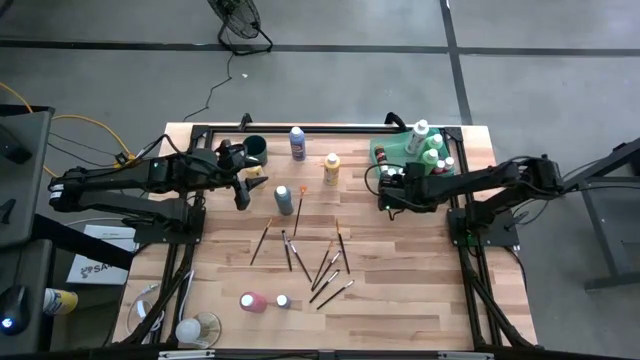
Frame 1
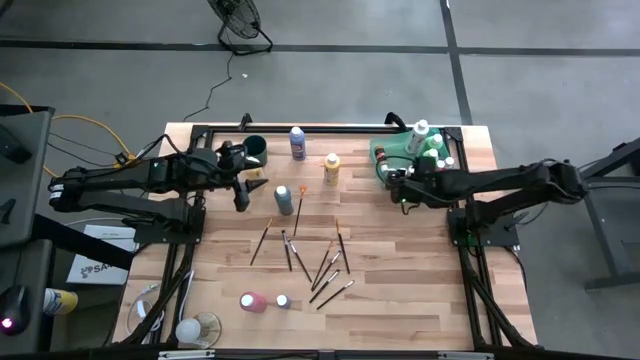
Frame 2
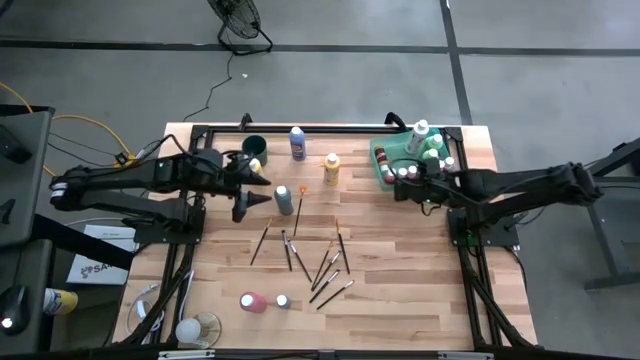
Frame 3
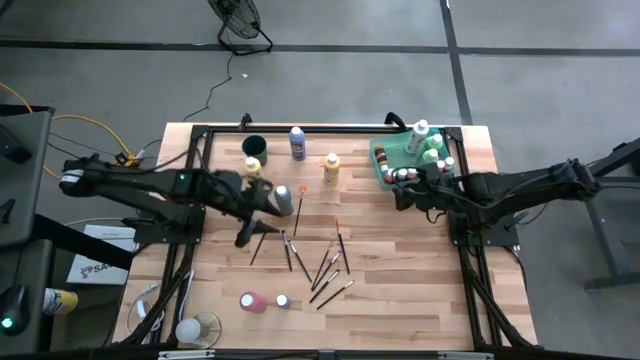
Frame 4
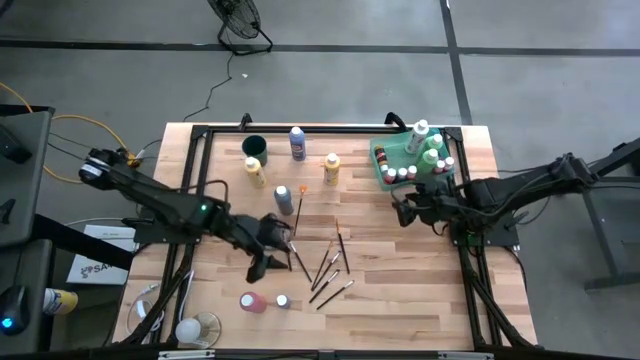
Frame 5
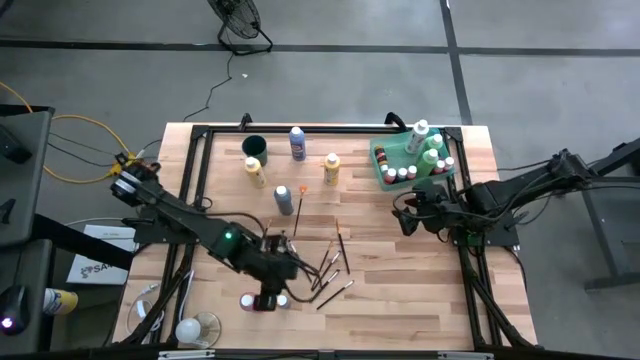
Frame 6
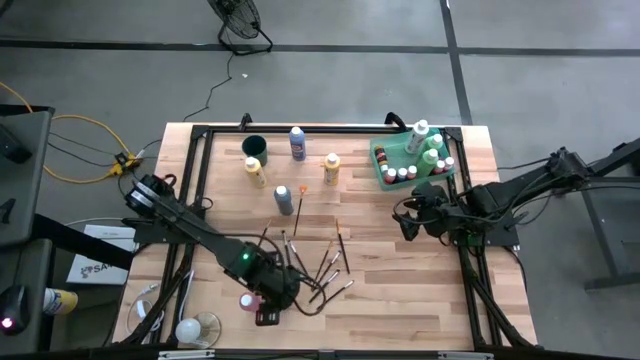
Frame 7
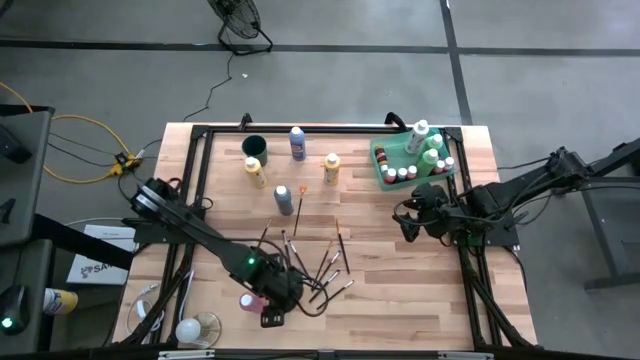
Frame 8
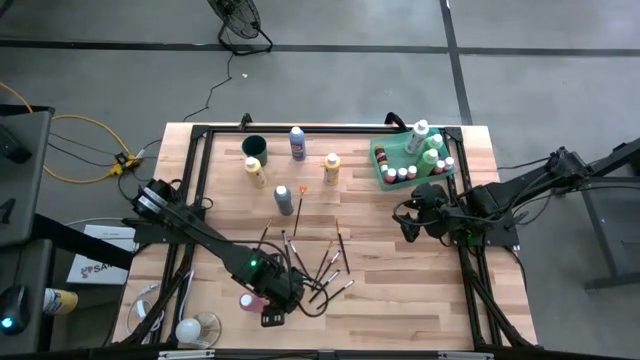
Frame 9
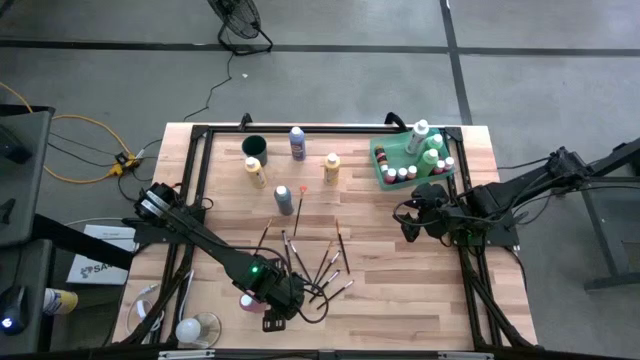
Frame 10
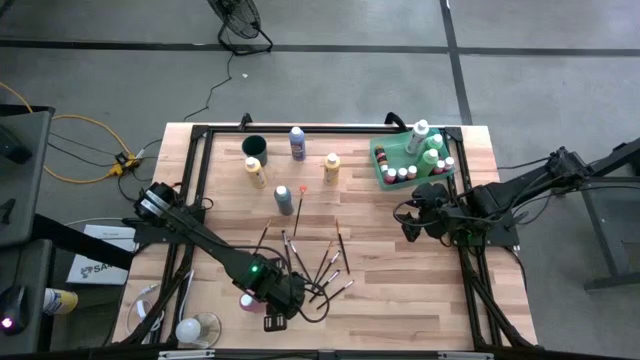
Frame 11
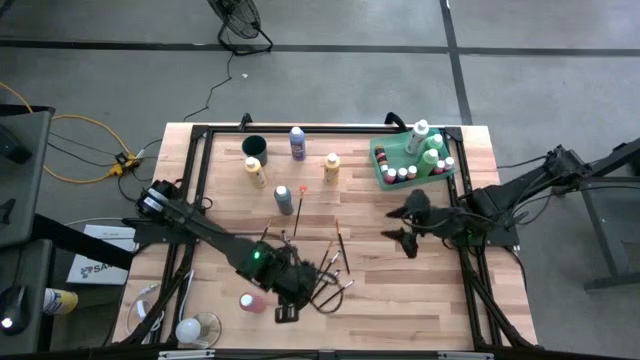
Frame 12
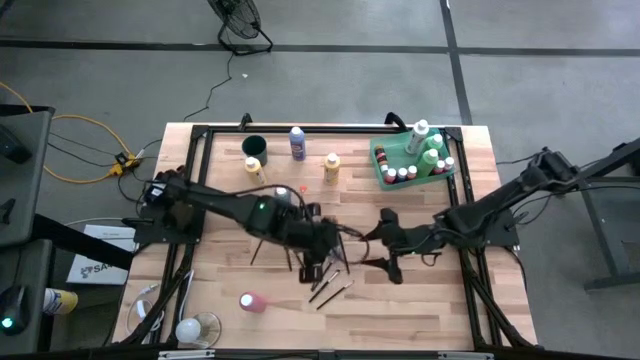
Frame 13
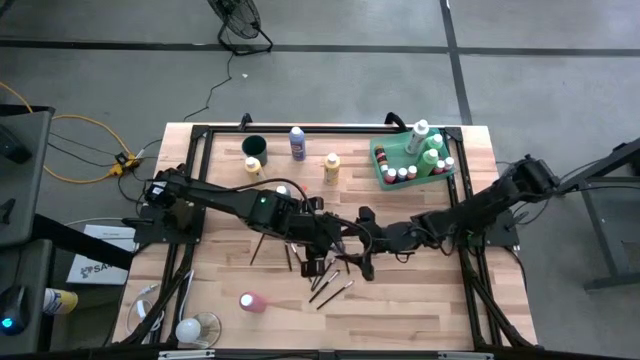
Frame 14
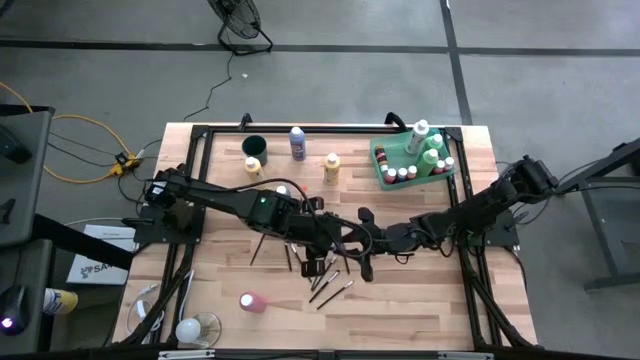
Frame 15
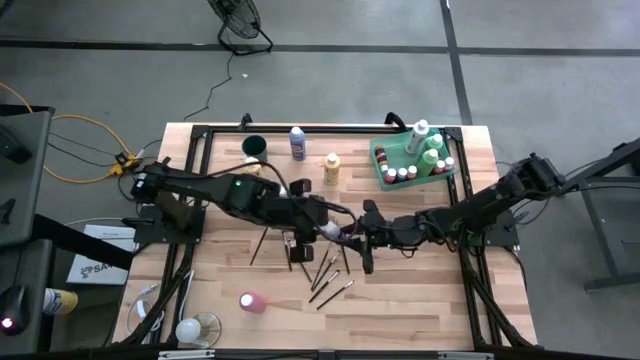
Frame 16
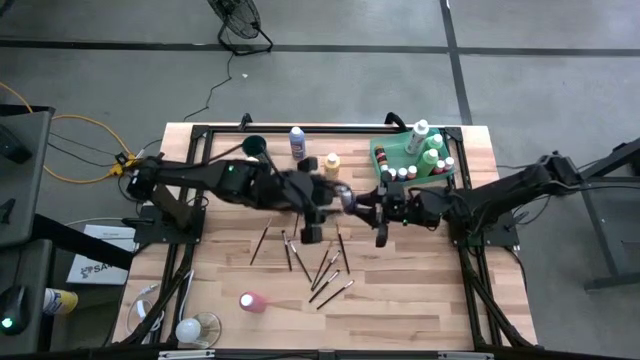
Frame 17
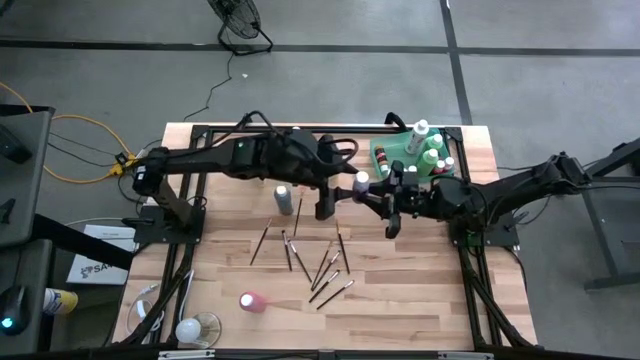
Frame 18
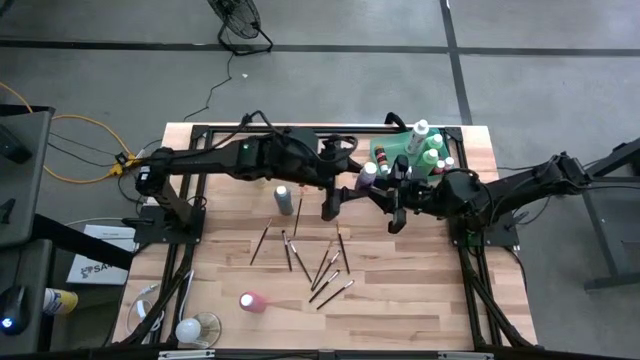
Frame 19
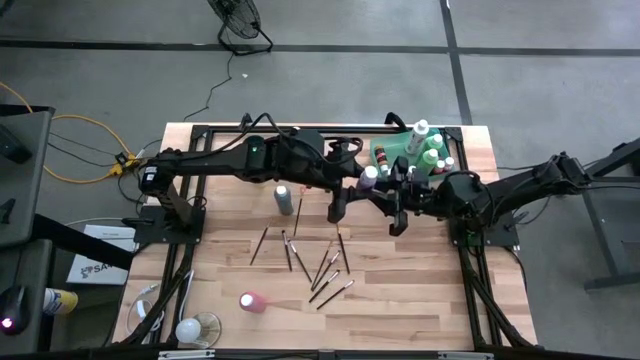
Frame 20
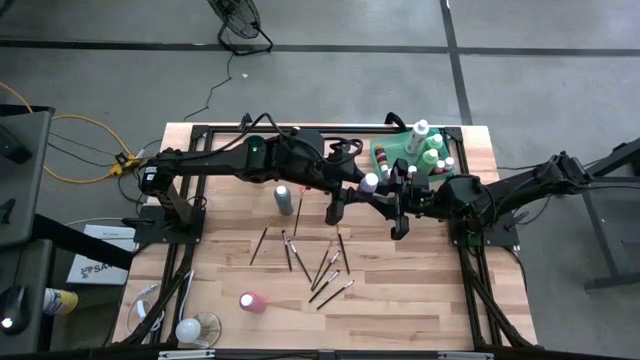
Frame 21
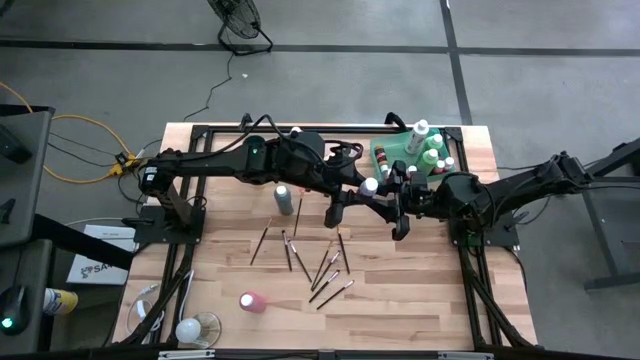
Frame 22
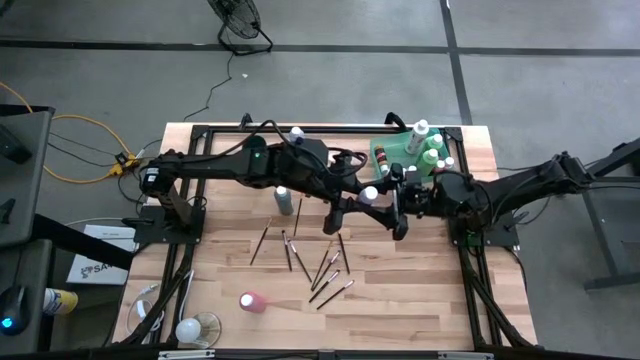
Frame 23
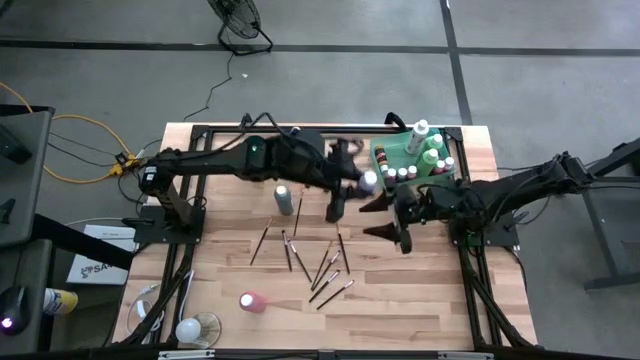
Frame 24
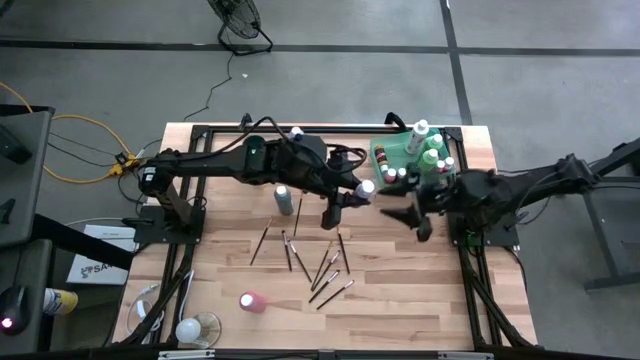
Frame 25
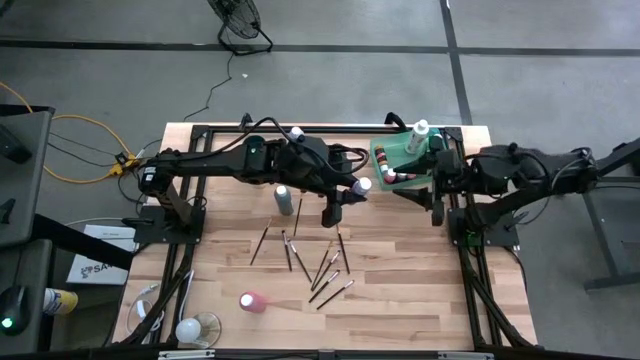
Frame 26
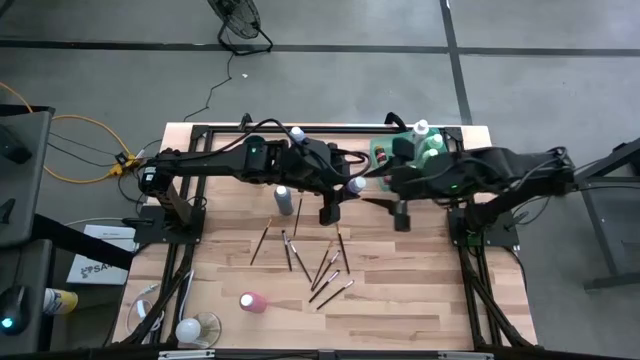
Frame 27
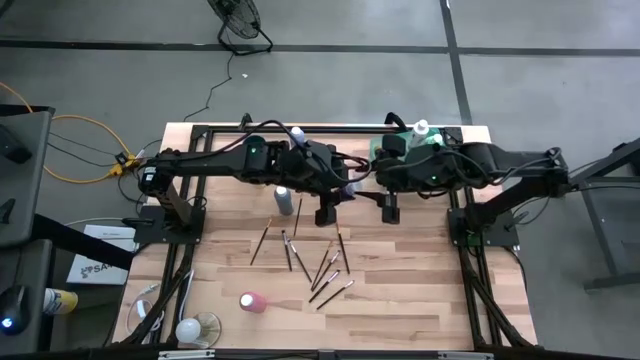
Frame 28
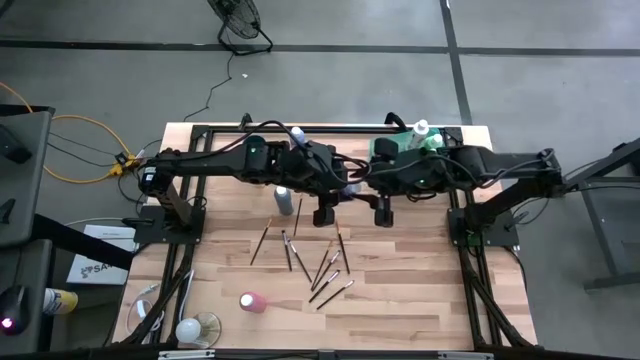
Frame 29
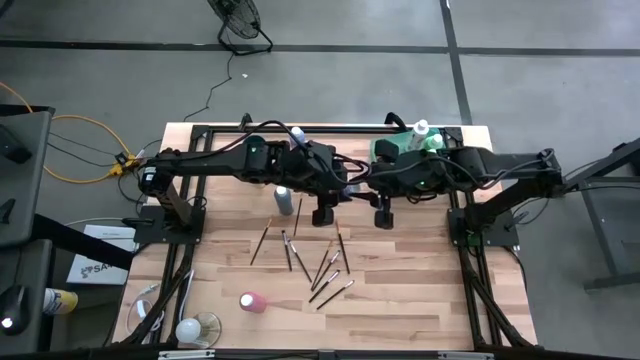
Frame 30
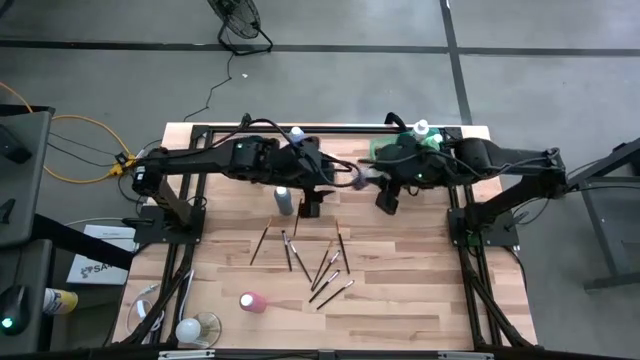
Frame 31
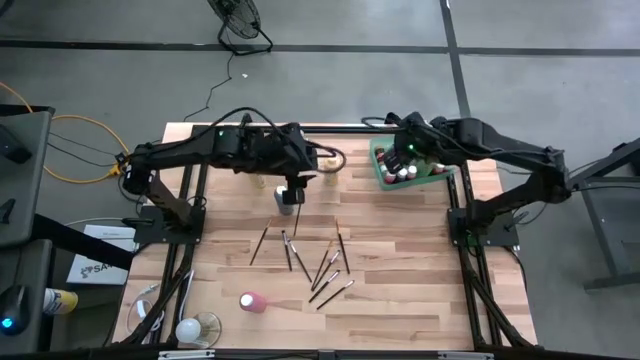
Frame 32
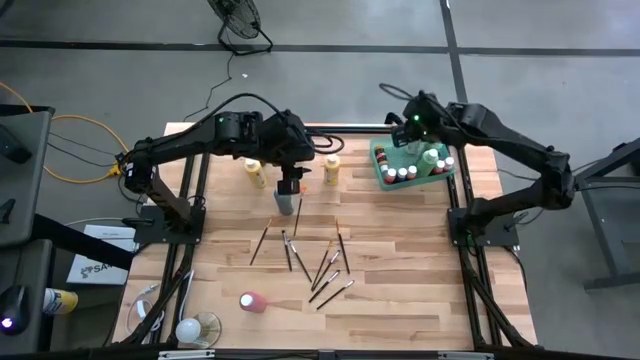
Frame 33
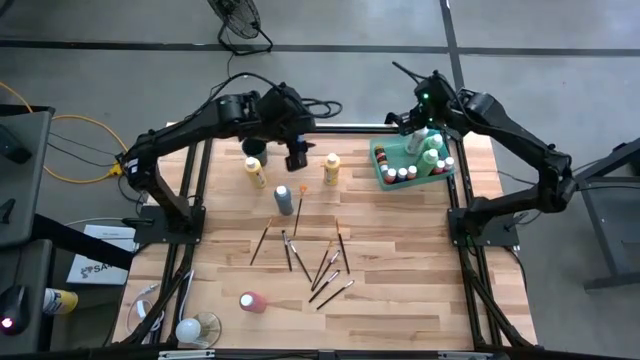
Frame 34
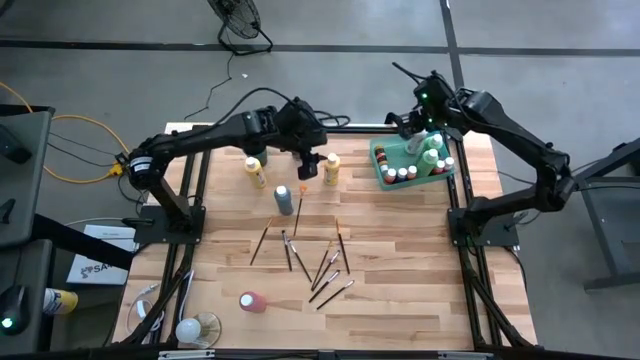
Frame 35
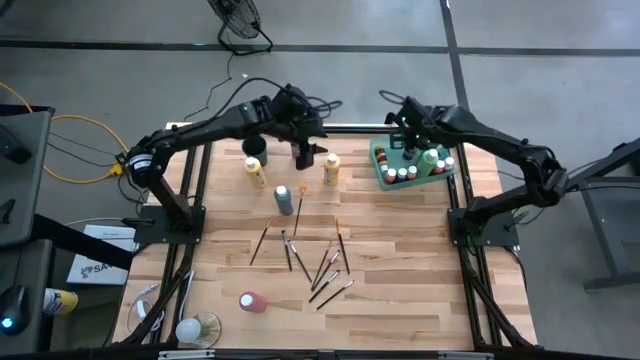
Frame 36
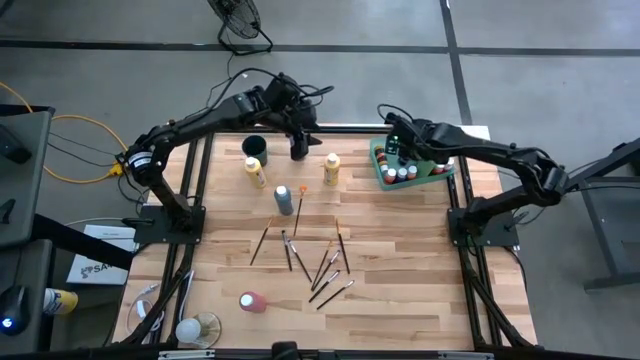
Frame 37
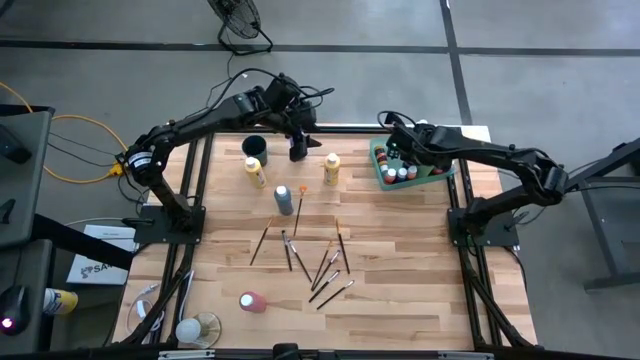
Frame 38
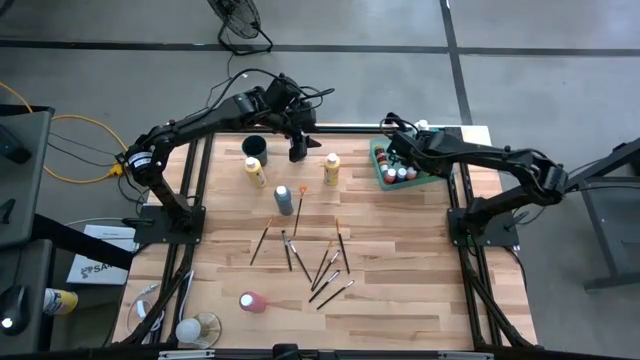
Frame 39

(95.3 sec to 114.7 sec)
Task: Pick & Place Paint Supplies
Put the small purple paint bottle into the green bin

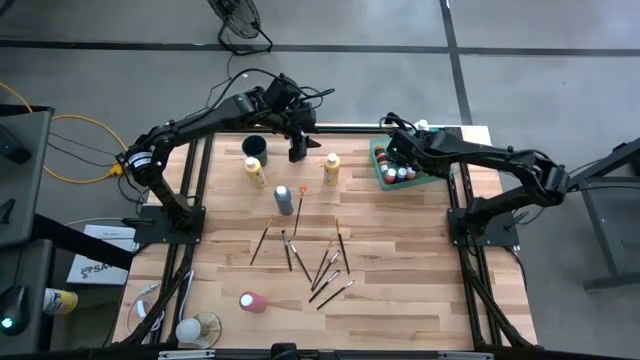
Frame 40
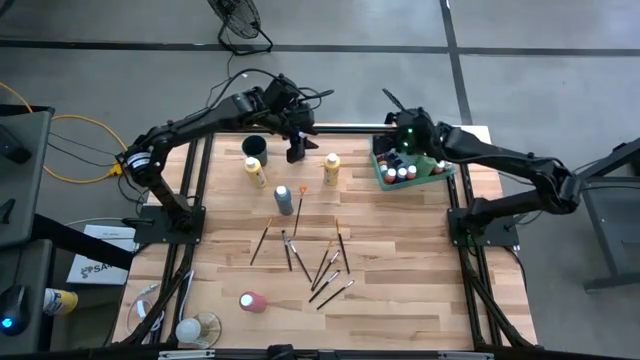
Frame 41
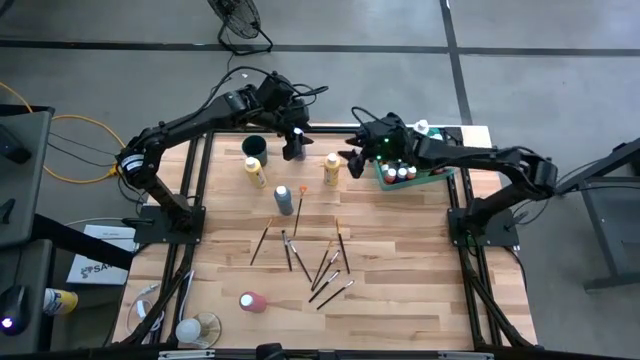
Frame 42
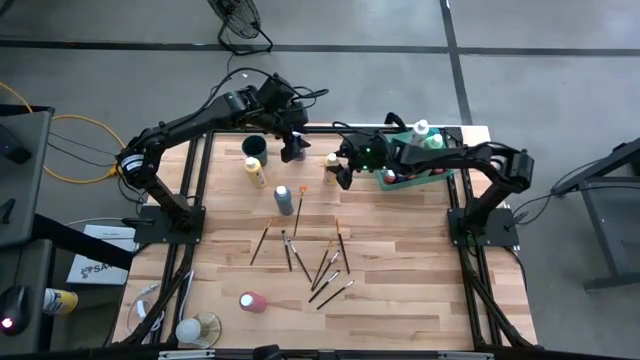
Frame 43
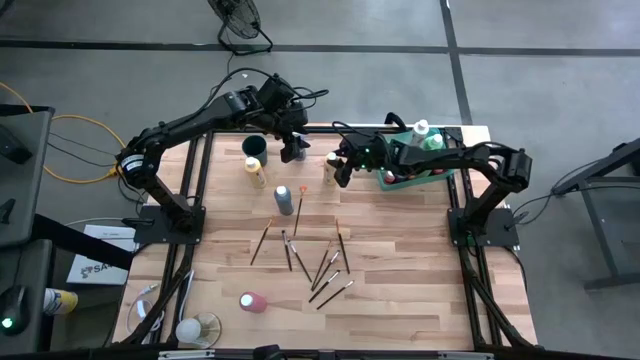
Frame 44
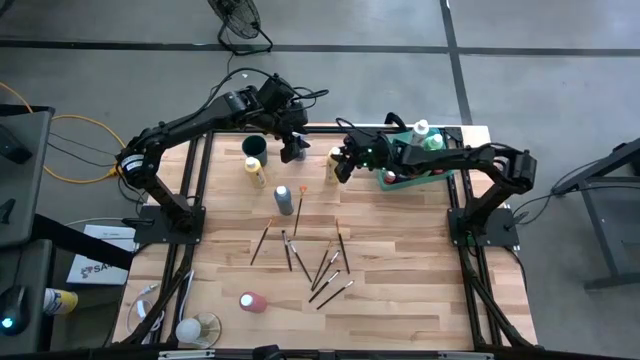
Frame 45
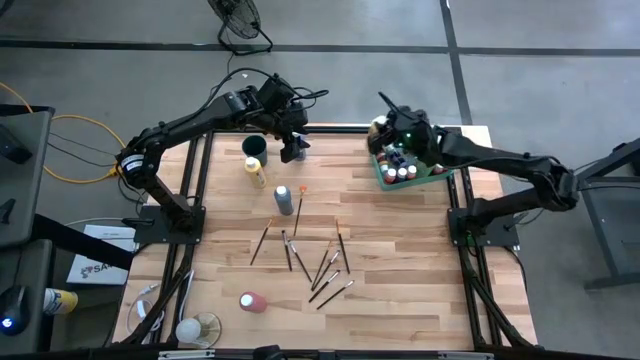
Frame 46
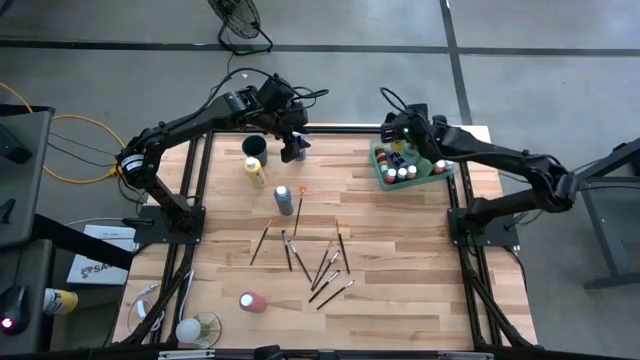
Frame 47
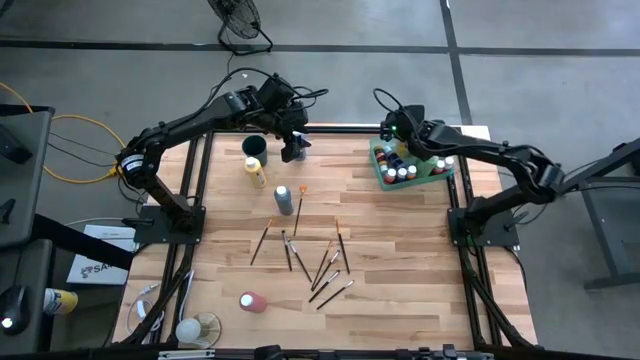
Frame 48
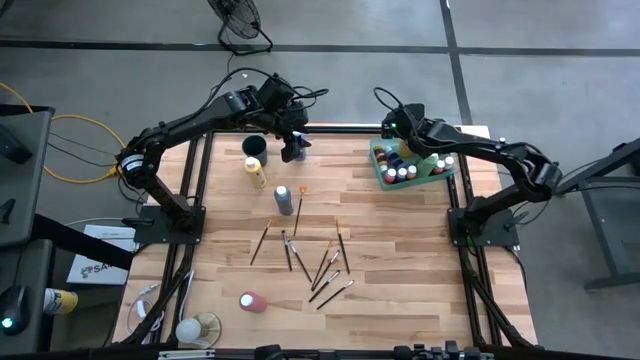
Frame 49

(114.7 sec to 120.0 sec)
Put the big yellow paint bottle into the green bin
